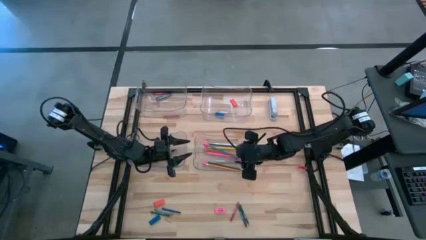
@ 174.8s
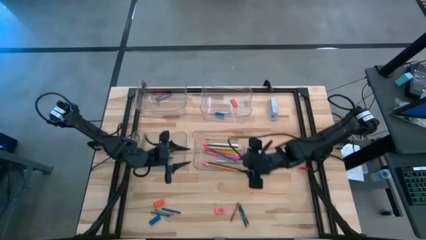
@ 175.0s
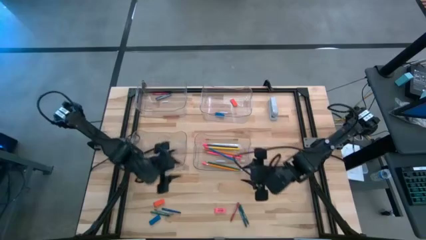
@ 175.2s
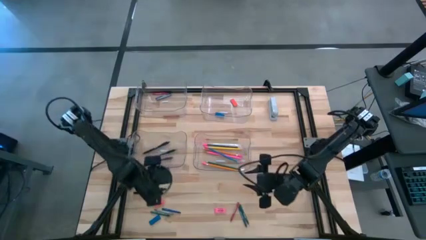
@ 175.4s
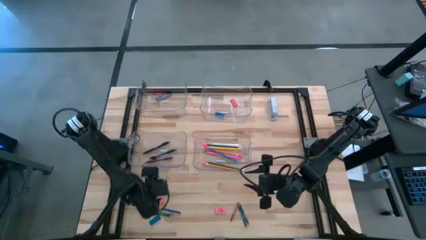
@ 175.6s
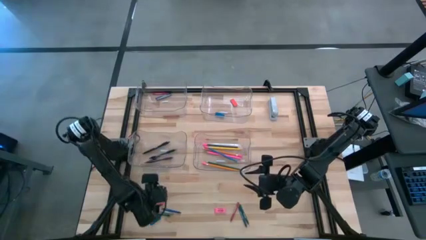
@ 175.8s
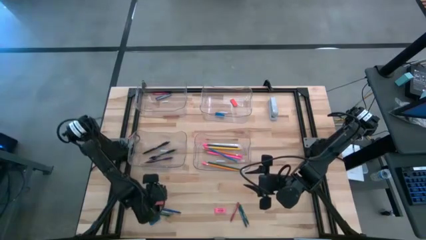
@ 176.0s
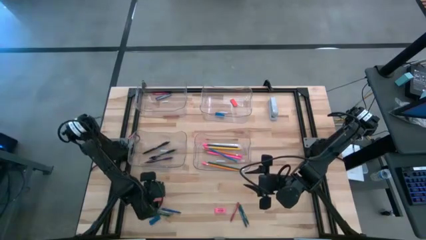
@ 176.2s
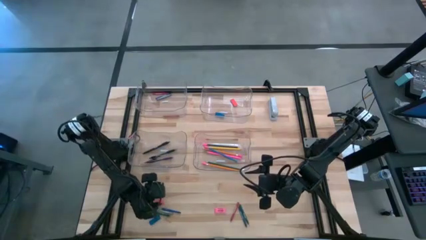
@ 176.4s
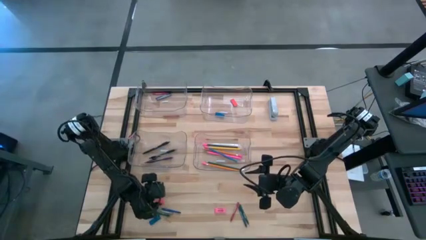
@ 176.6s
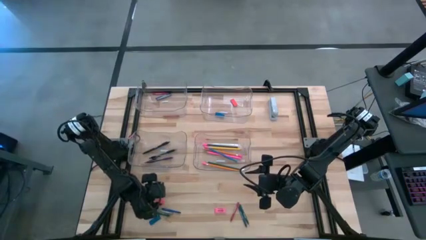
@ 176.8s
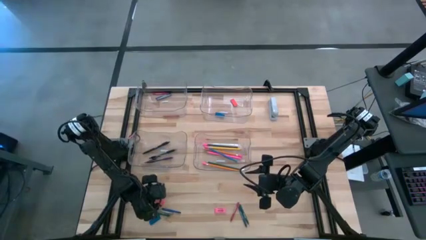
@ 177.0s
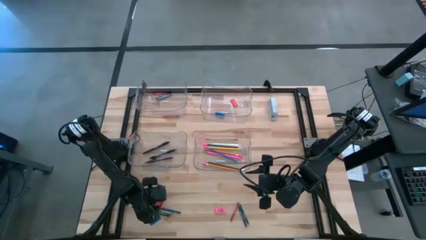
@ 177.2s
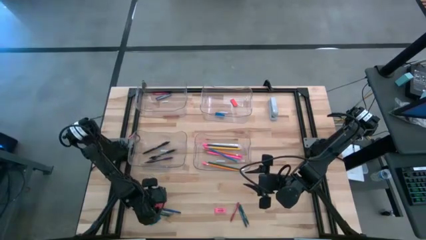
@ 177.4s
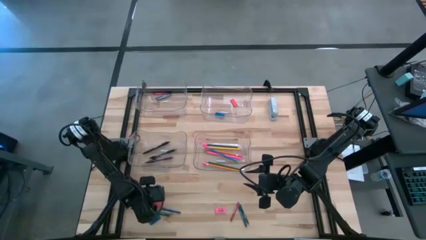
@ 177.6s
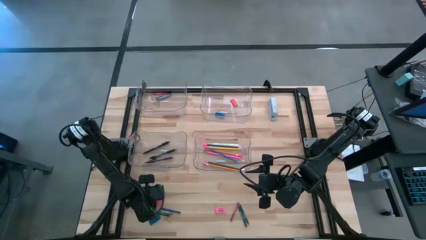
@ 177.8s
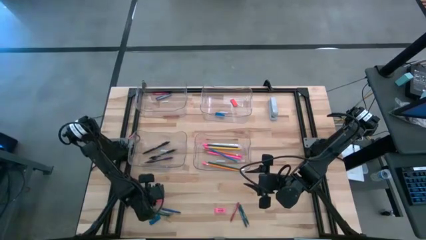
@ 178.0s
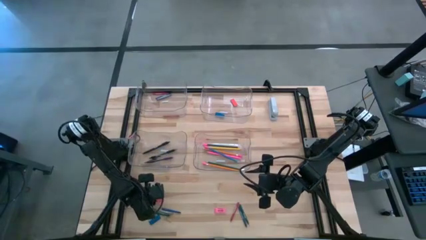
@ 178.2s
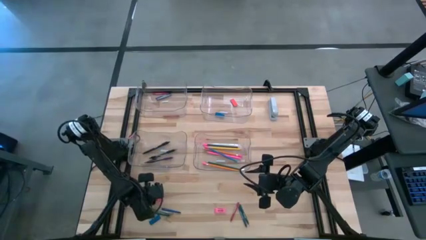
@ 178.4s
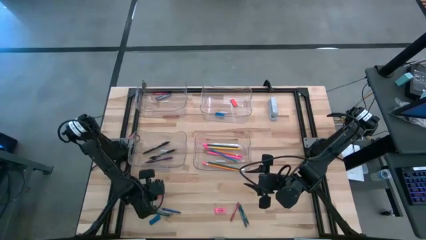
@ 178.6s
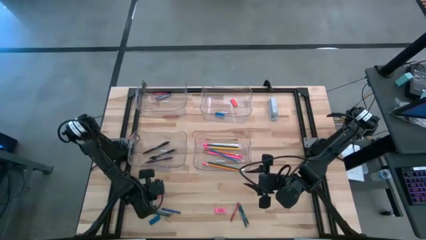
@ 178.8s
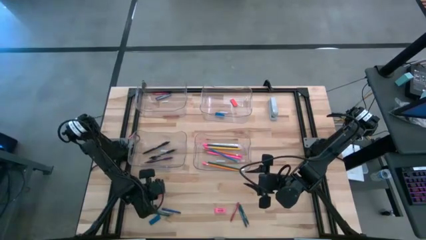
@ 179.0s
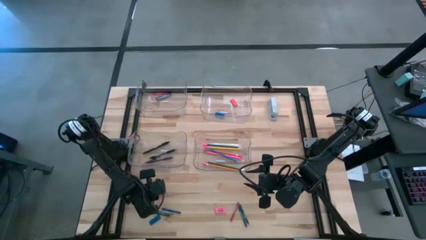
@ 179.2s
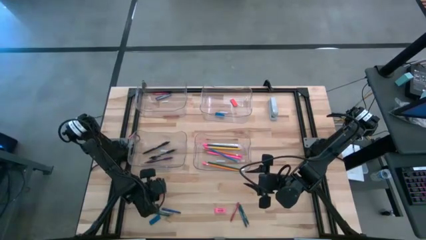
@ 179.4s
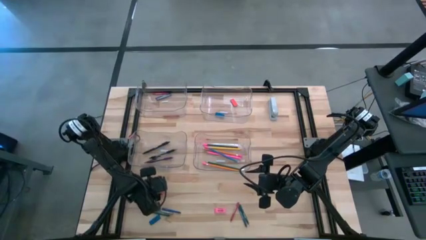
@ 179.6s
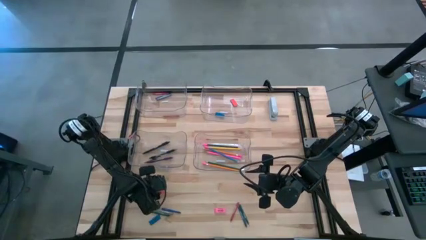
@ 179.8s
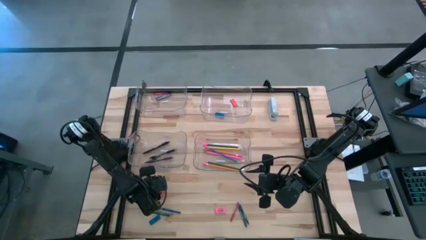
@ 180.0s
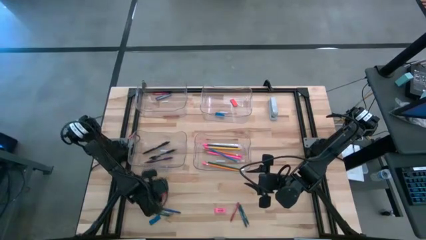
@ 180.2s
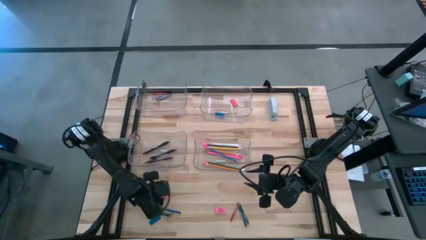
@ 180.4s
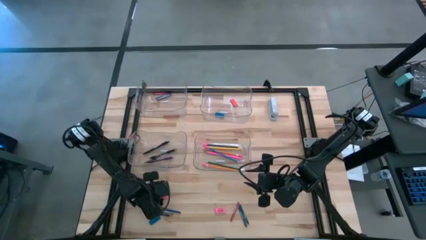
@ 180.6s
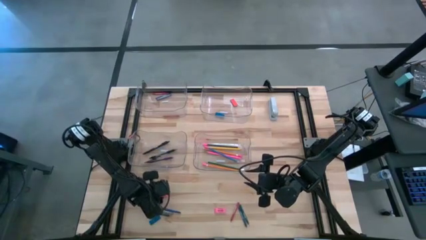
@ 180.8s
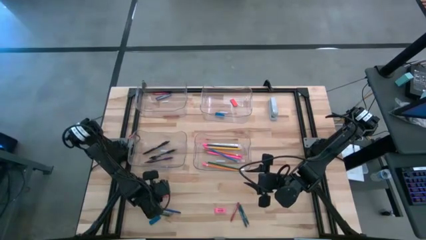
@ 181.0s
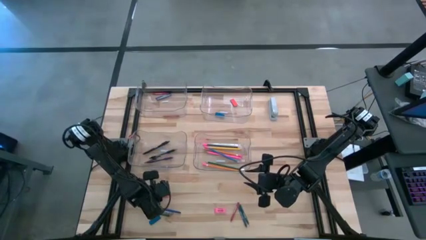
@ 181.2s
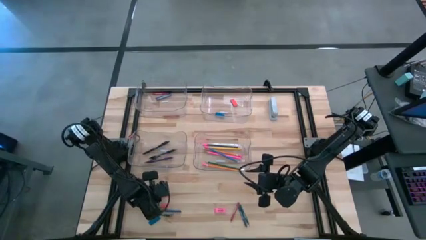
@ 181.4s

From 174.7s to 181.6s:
Task: Sort crayons/erasers/pens/pencils in bins
Put the orange eraser into the top right transparent bin

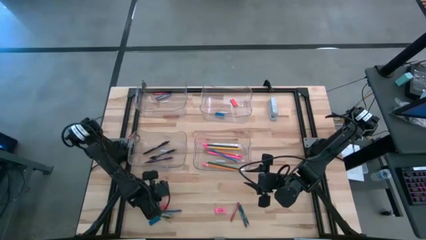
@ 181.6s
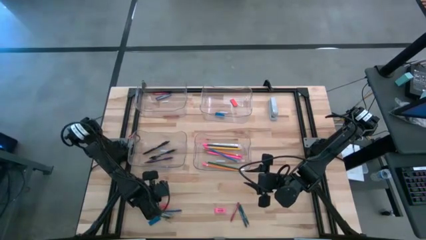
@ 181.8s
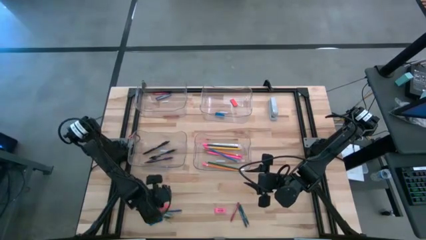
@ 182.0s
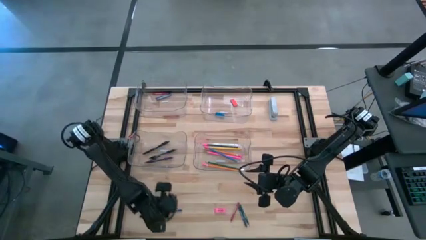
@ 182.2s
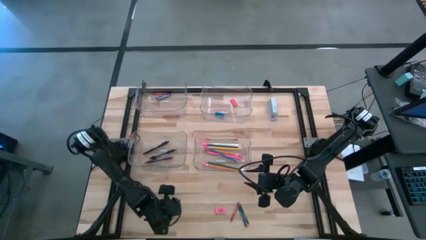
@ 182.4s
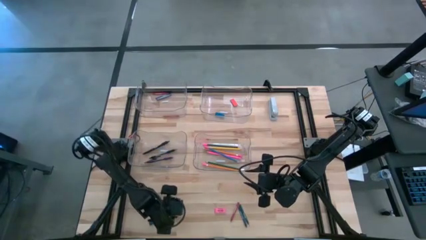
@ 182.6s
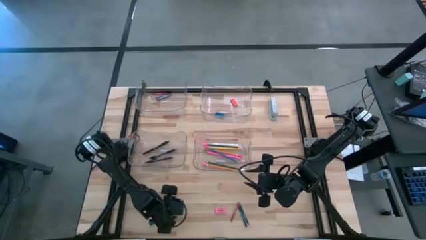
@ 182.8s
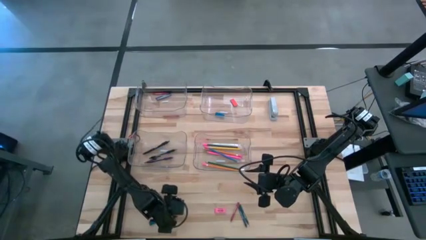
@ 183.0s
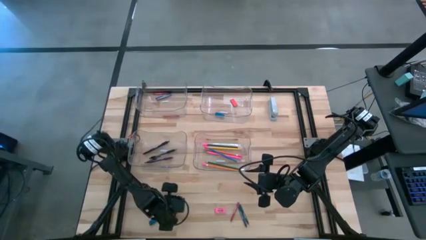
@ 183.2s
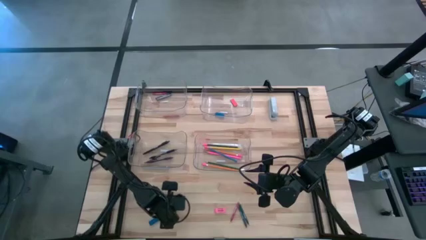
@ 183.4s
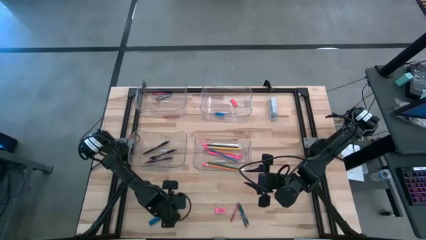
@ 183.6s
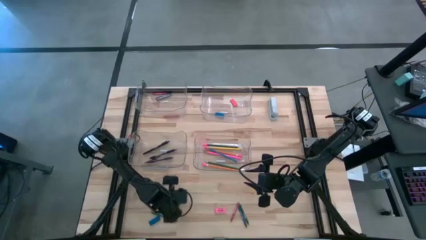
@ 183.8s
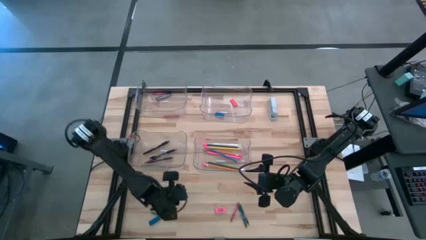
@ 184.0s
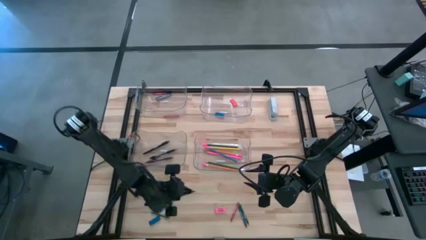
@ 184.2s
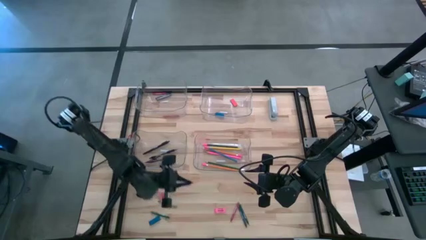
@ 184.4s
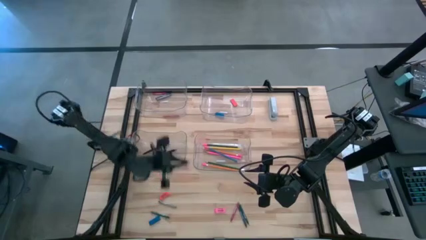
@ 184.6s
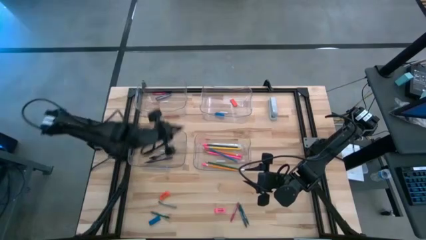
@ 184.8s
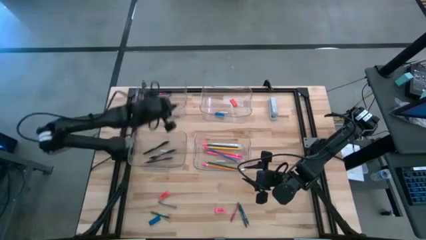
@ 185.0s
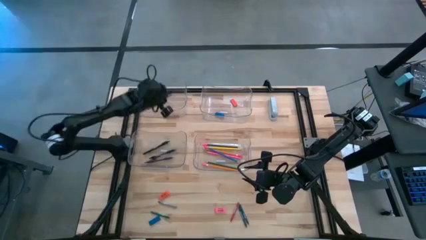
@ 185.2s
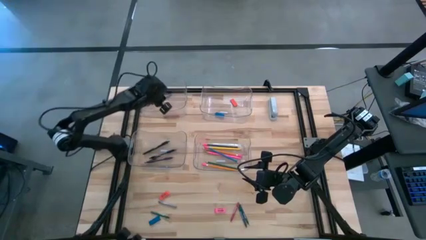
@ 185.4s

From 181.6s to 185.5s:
Put the left blue crayon into the top left transparent bin
